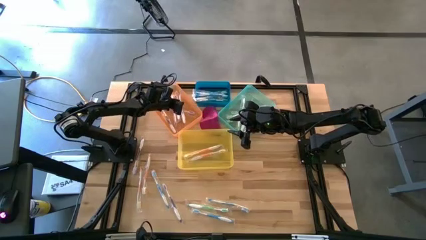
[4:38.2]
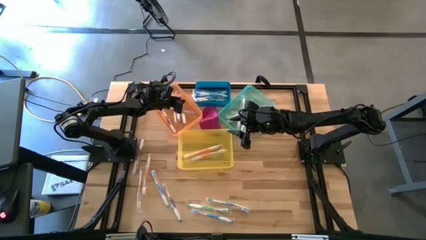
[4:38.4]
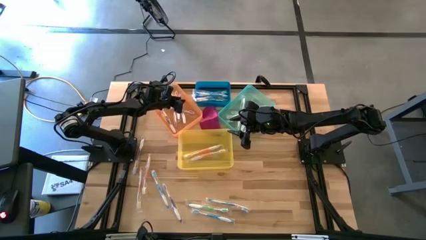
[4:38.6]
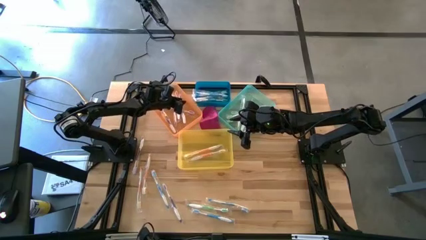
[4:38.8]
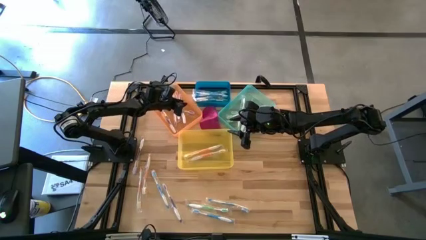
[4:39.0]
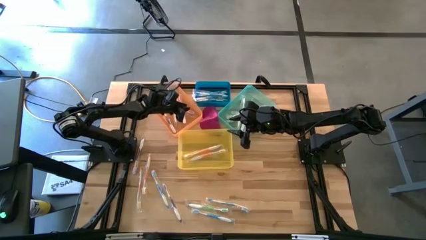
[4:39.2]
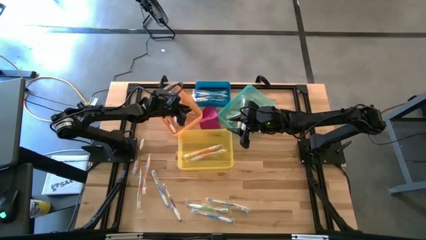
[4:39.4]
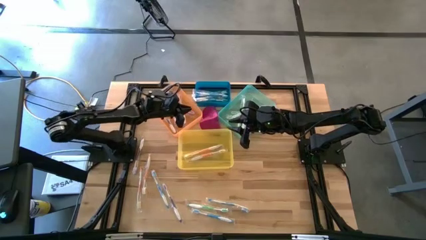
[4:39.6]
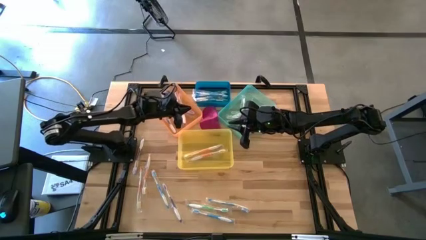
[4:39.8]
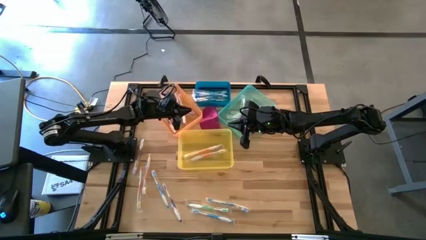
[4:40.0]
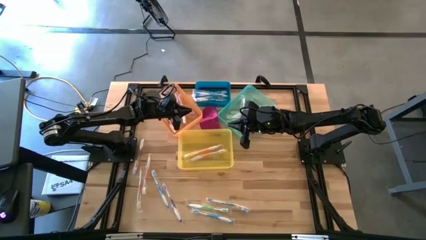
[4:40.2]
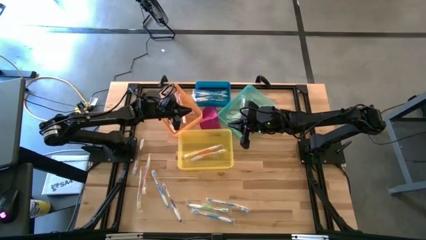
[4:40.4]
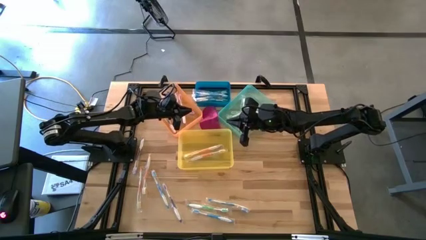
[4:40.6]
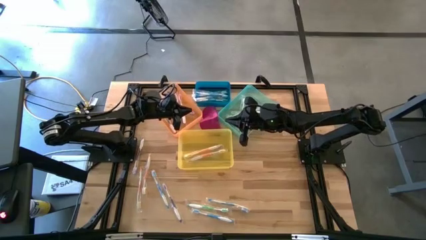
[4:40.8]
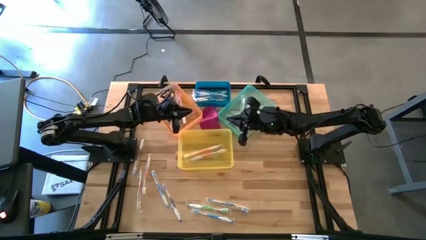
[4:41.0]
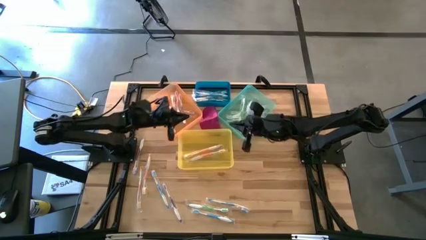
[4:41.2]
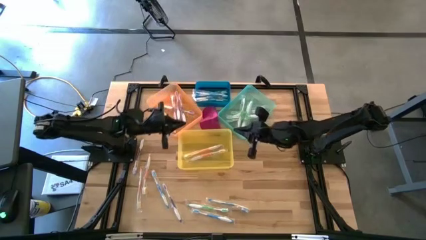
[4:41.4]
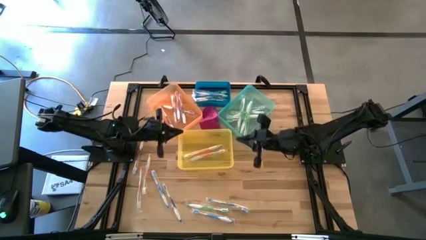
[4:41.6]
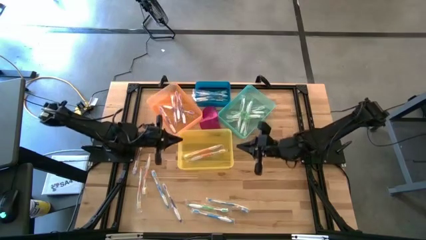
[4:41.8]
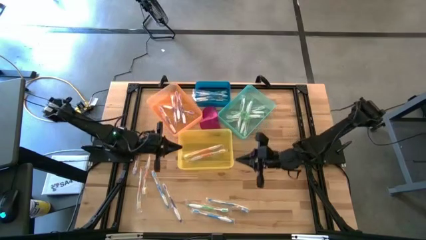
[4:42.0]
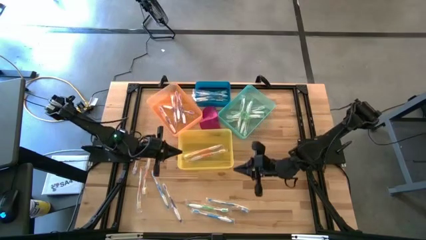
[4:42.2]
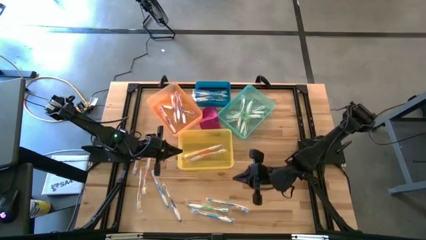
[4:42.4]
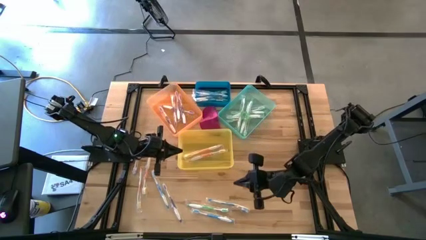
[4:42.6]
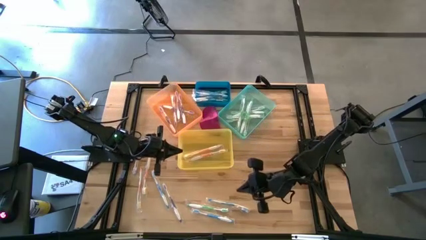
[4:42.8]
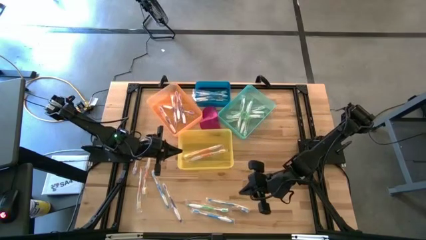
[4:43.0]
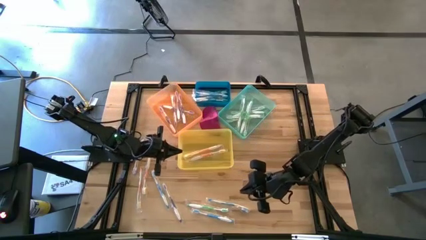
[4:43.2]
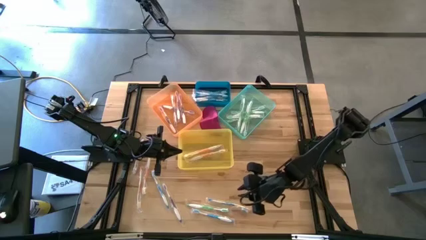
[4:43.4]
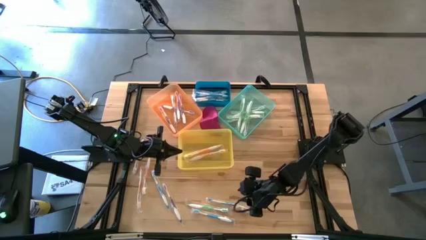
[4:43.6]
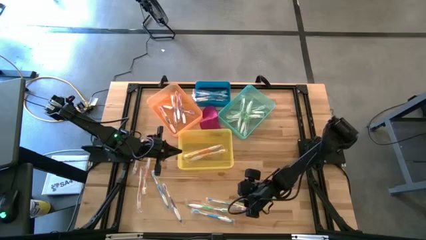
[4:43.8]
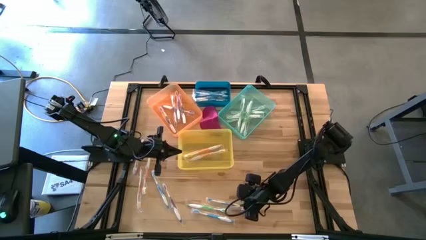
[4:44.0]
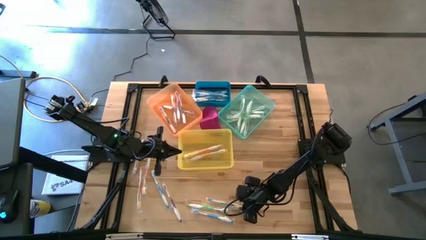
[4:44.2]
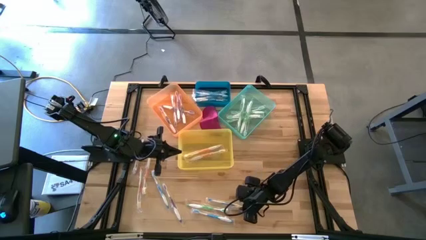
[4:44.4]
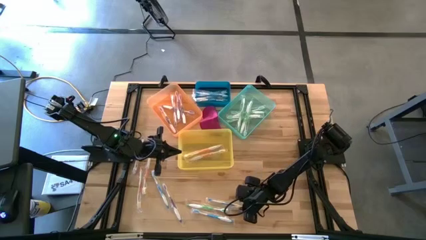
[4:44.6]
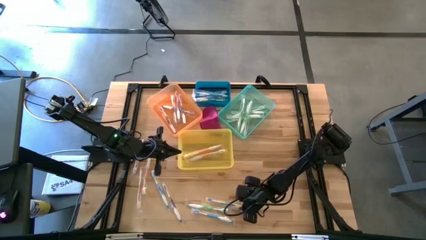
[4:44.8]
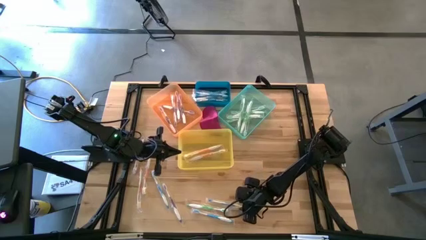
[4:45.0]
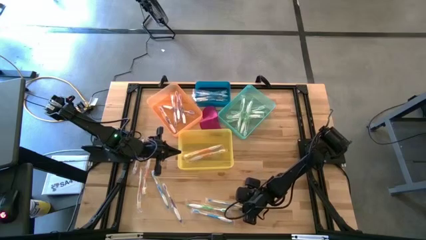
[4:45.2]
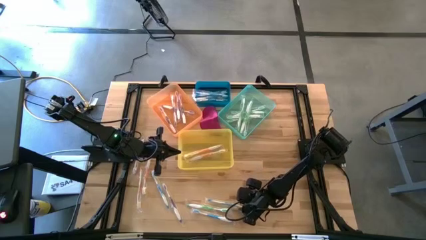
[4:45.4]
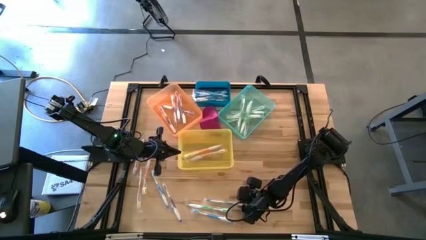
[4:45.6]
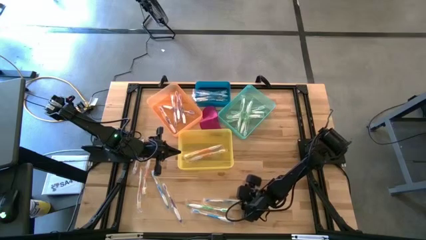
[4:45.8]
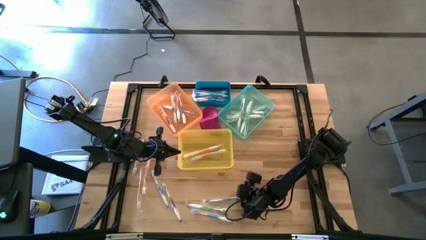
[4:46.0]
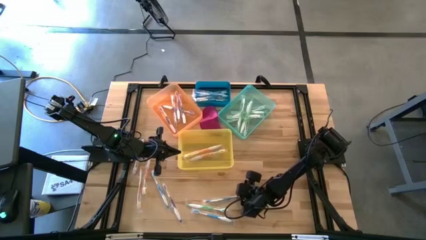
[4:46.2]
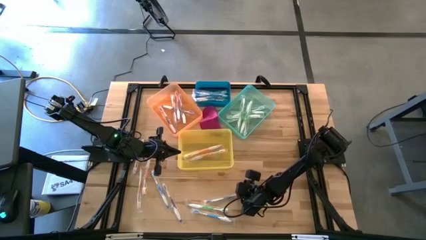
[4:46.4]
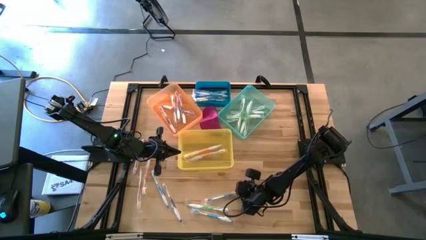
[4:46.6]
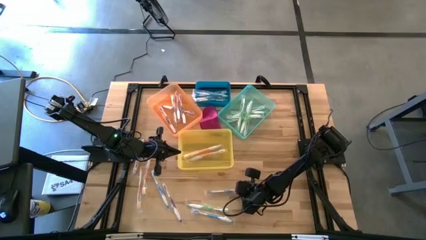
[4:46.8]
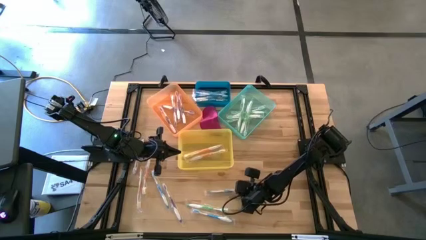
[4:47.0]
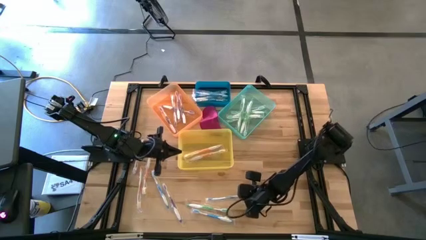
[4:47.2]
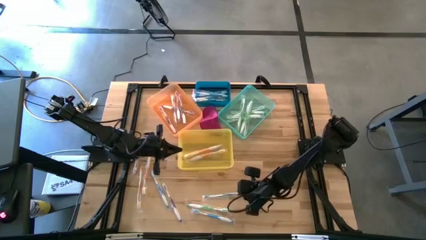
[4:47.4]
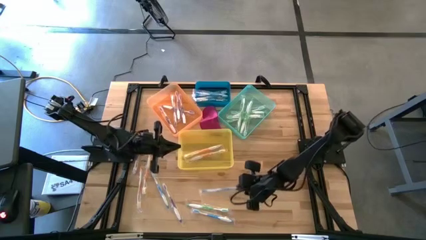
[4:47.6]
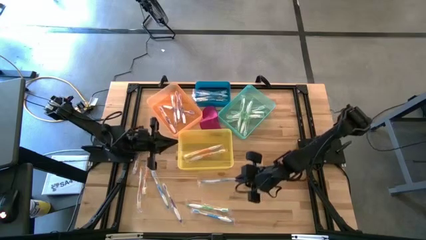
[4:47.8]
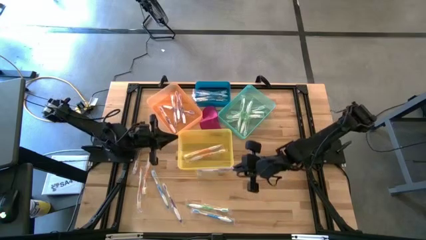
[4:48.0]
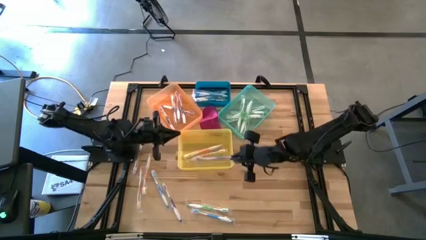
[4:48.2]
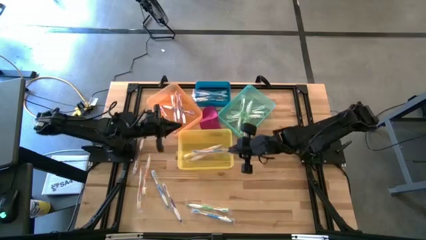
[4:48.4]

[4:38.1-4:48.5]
Task: Pick & Place Toothbrushes
Put the blue toothbrush into the blue bin
